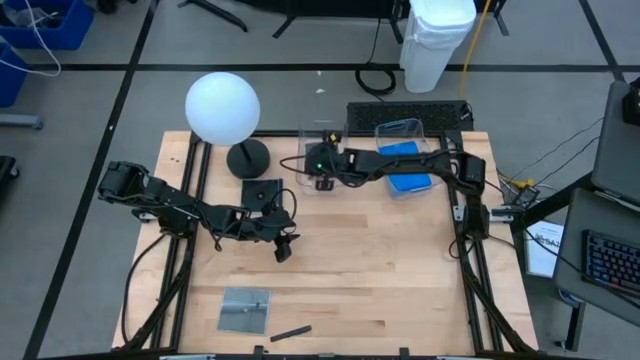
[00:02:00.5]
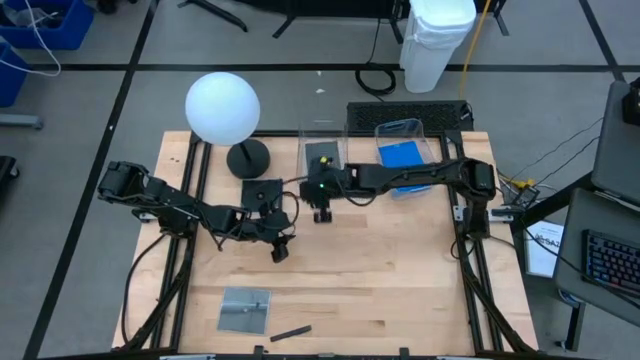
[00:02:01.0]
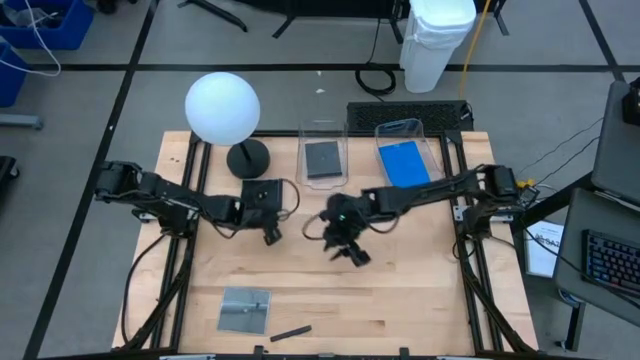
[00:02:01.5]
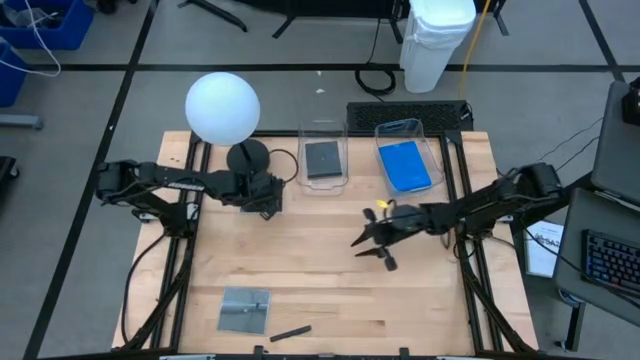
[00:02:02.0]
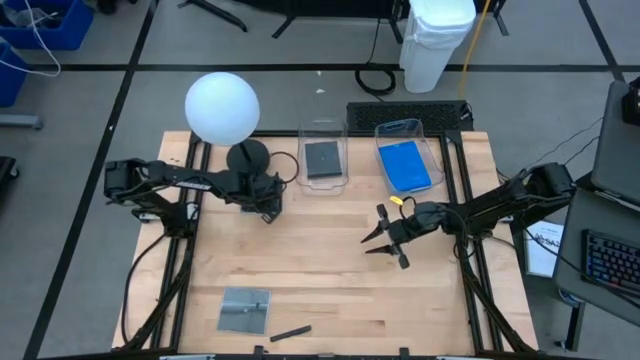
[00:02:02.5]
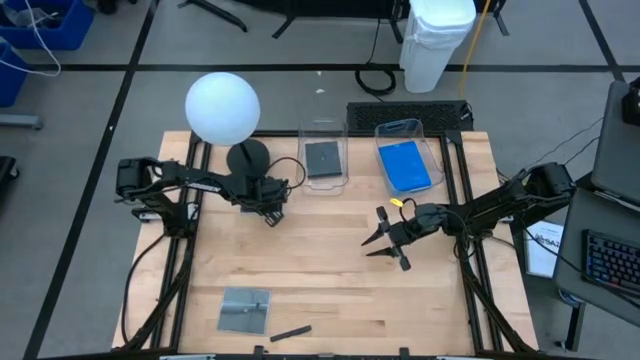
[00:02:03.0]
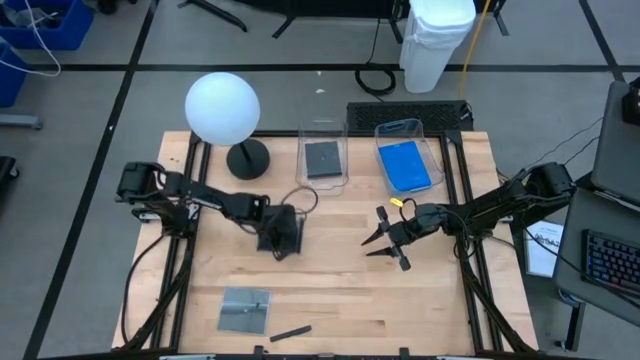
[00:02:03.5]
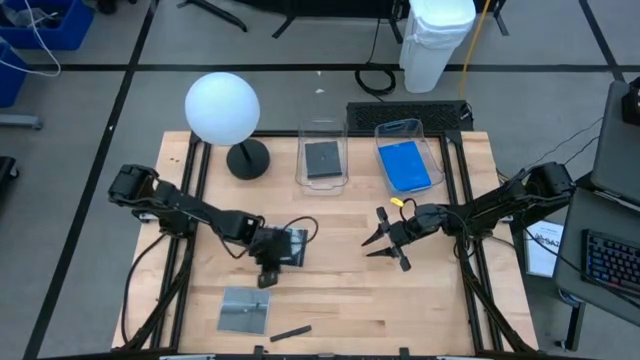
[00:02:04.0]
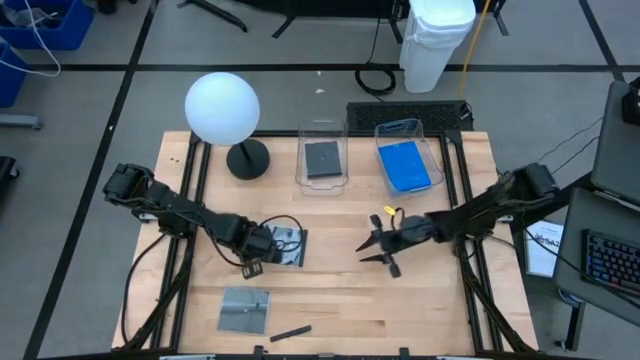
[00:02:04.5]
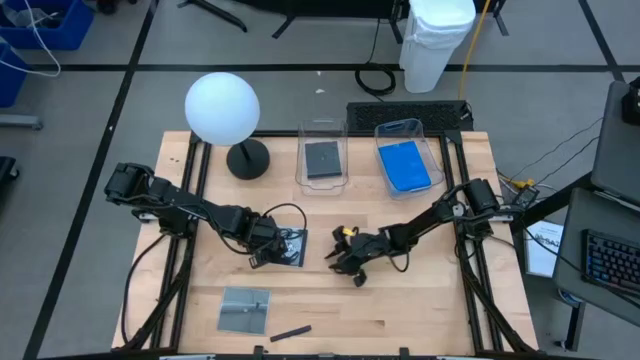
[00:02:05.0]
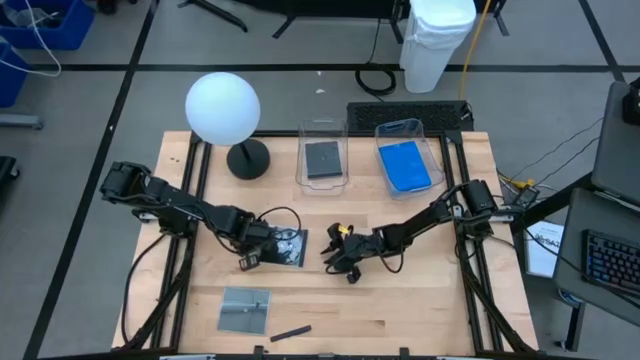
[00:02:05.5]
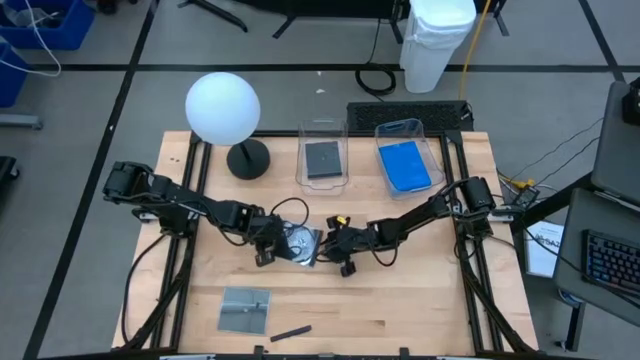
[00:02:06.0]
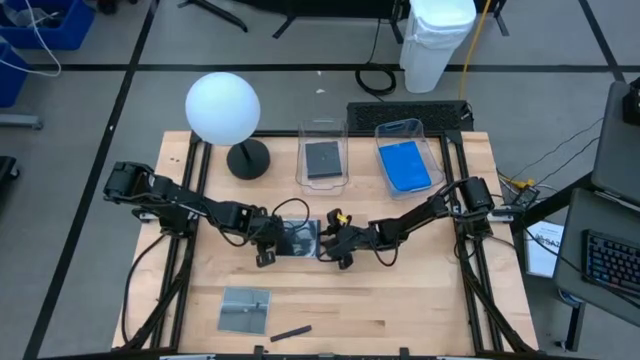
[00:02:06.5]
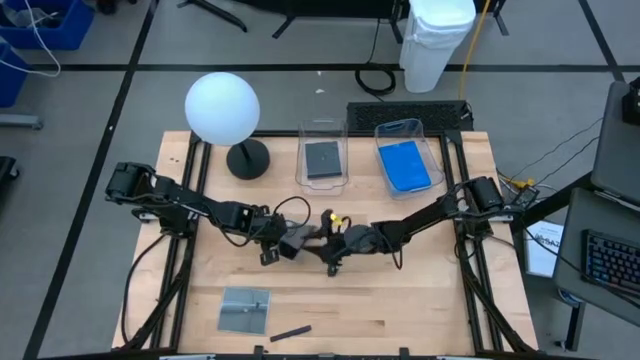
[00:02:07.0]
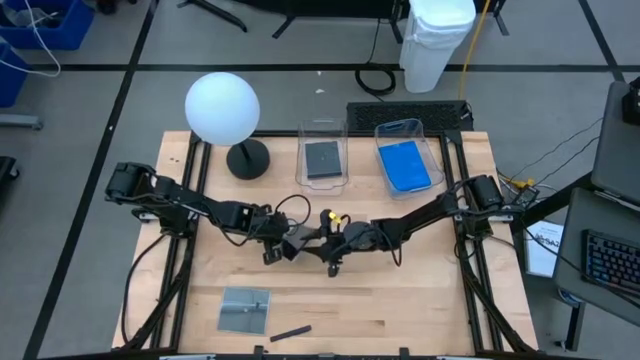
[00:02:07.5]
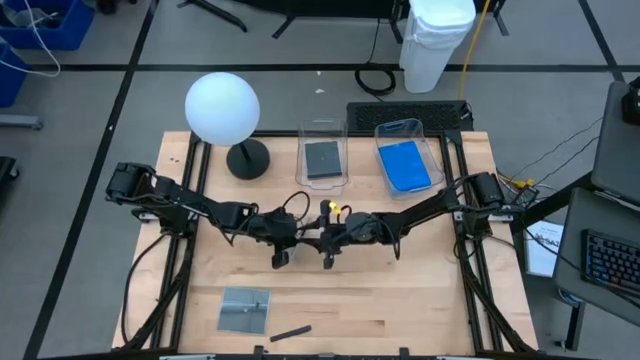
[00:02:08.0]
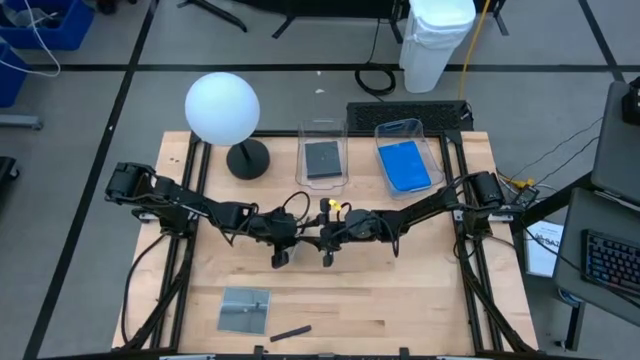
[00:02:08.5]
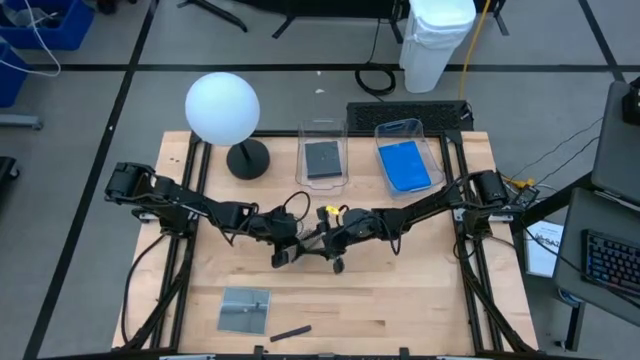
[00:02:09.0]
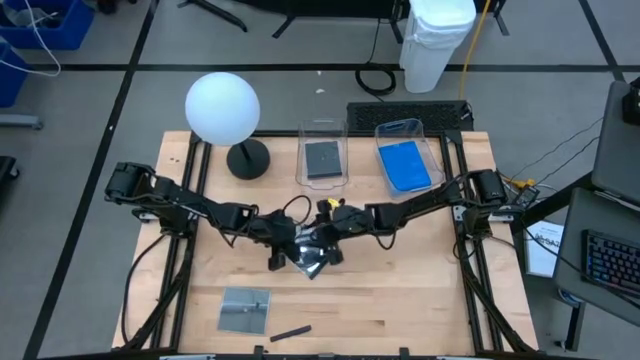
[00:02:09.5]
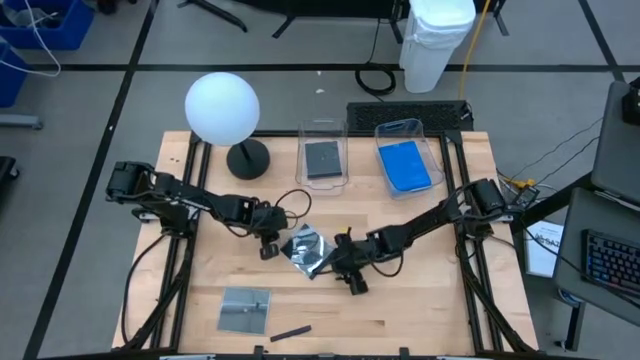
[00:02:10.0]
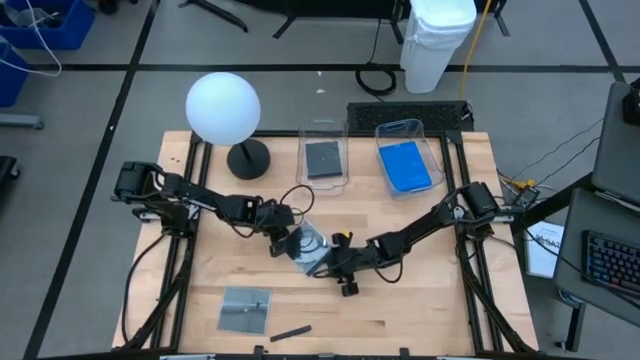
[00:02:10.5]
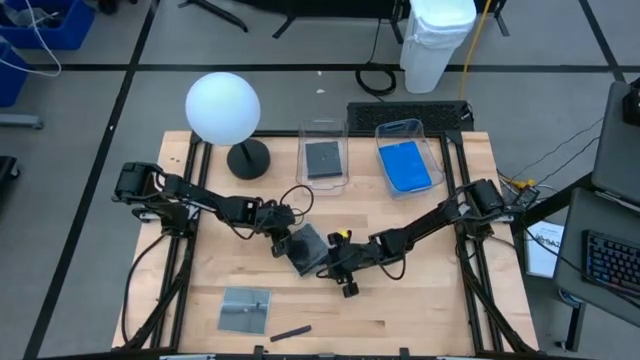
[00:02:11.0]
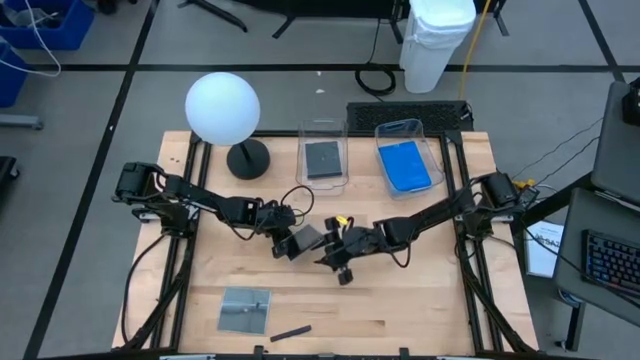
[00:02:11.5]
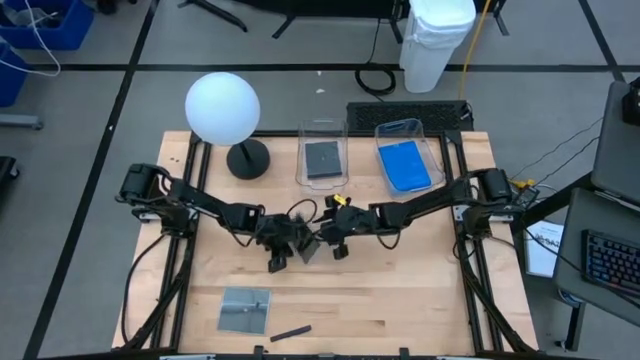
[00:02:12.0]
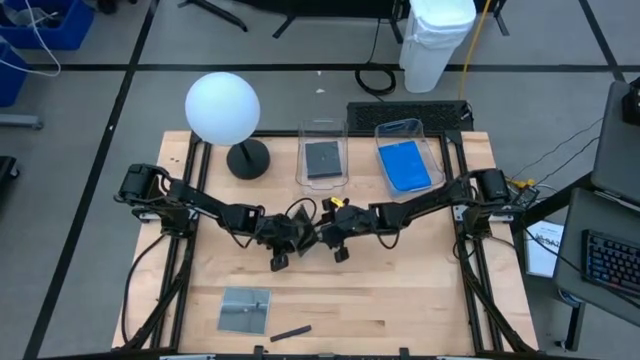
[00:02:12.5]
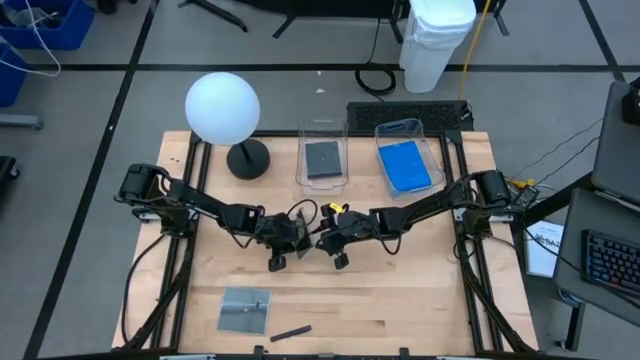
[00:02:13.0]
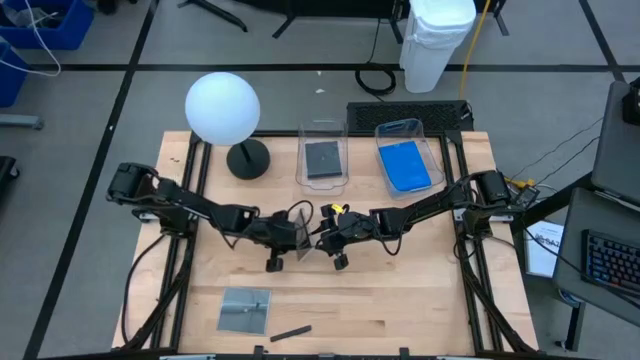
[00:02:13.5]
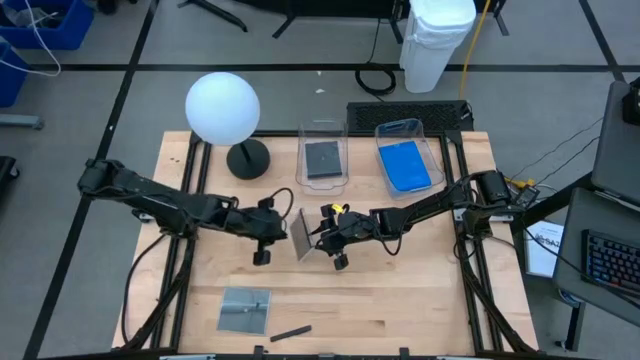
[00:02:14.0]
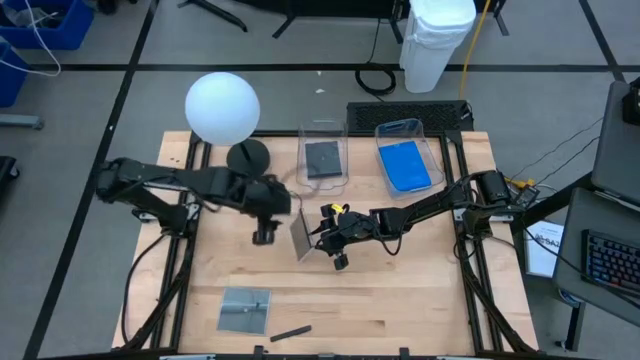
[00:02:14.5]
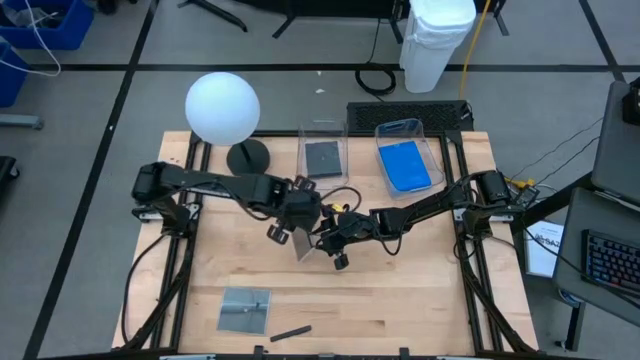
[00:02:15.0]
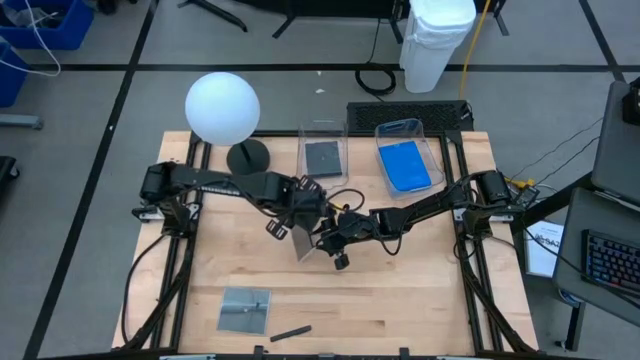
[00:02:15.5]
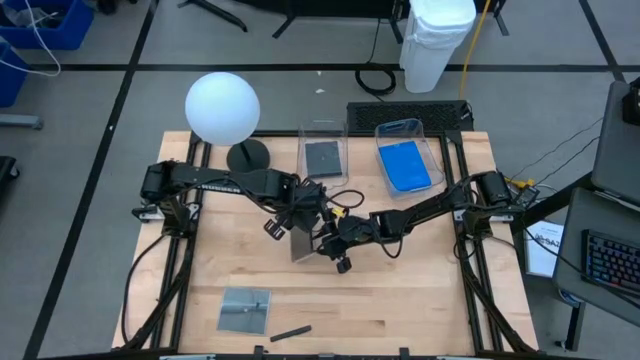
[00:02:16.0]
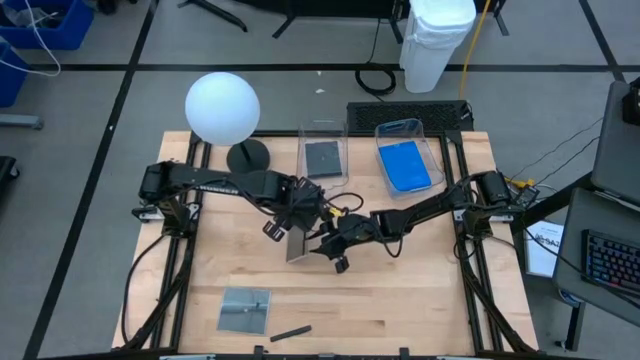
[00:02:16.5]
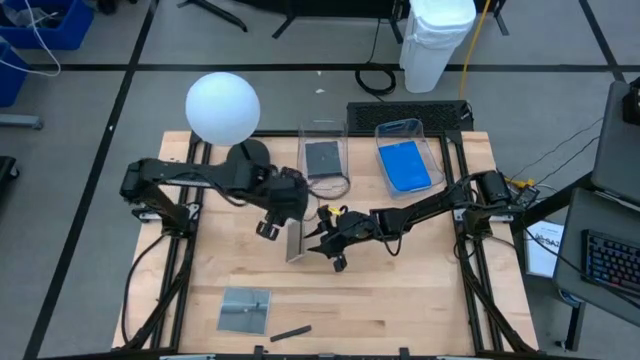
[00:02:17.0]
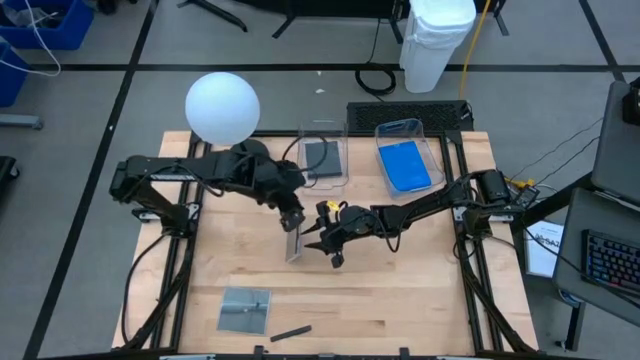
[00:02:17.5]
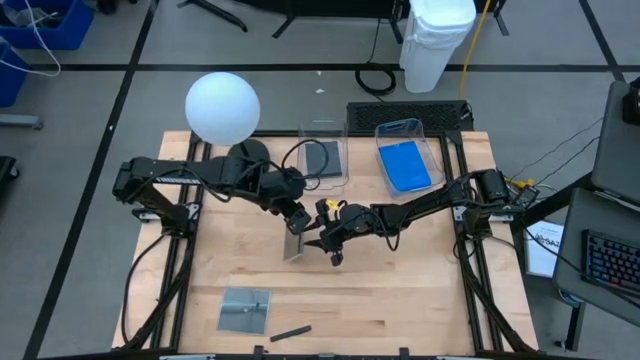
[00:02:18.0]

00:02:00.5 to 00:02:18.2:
Task: Pick & place jewel cases by type
Put the top black CD case into the left transparent bin

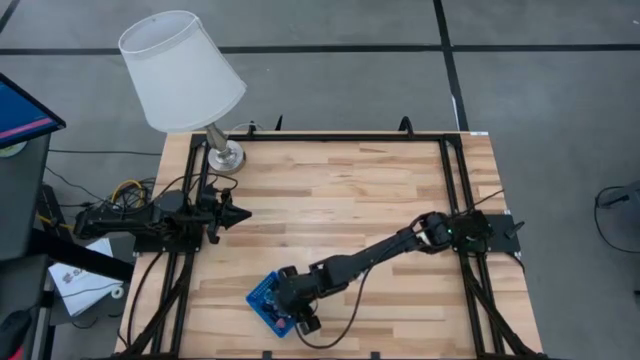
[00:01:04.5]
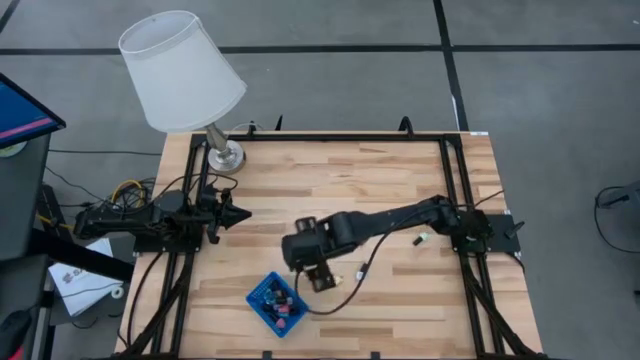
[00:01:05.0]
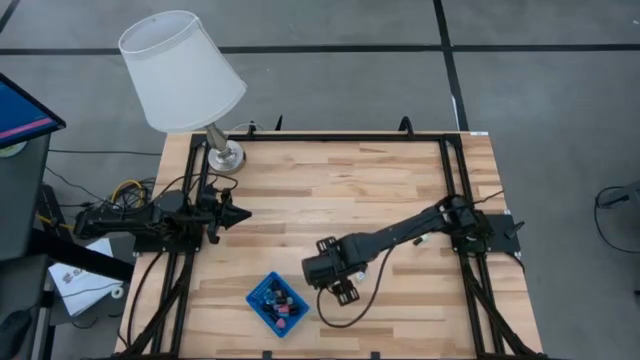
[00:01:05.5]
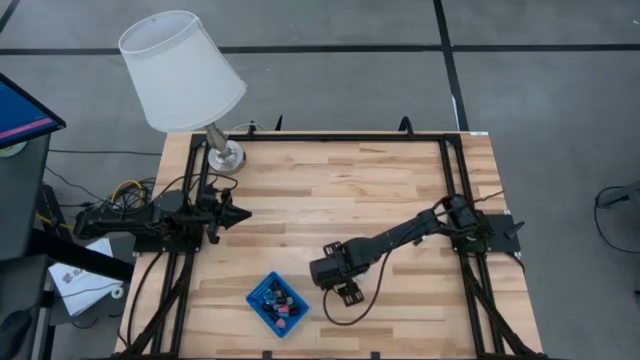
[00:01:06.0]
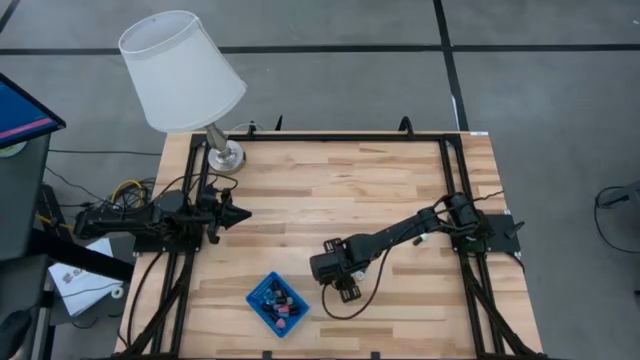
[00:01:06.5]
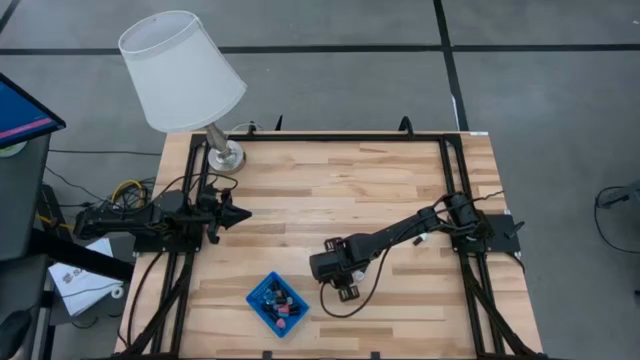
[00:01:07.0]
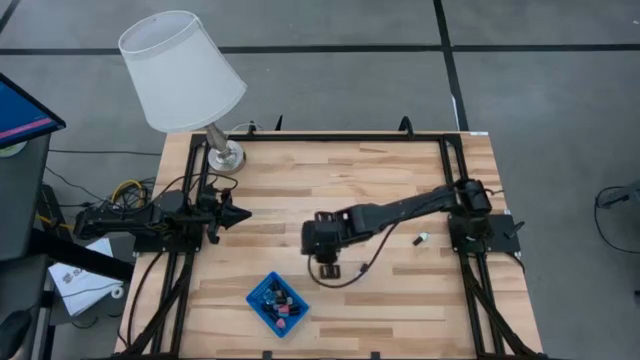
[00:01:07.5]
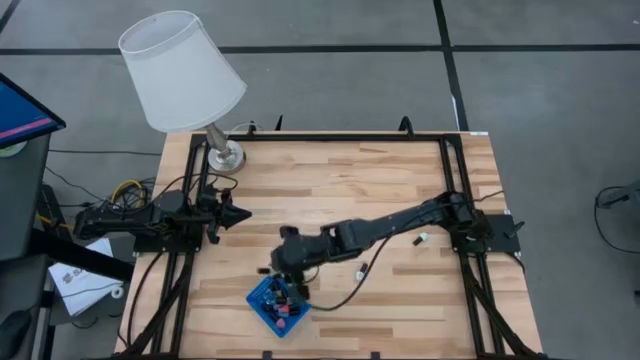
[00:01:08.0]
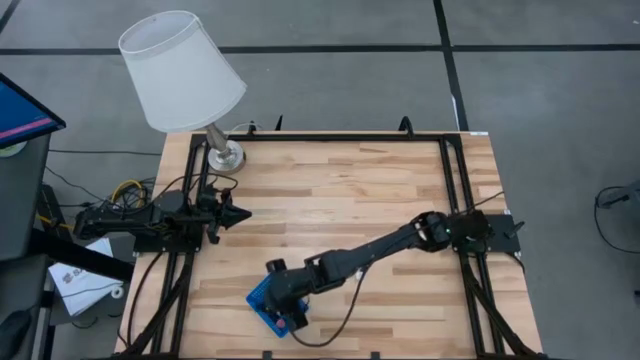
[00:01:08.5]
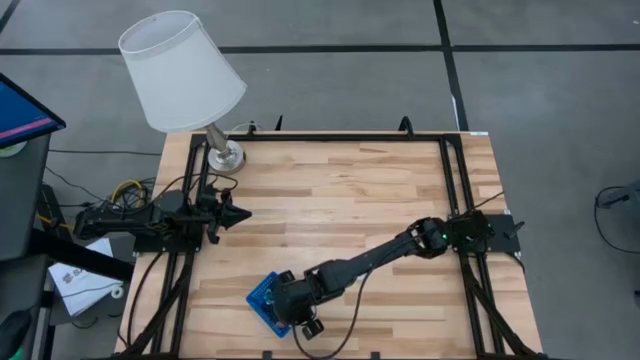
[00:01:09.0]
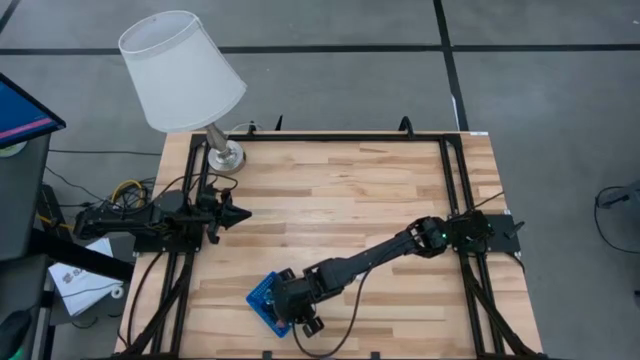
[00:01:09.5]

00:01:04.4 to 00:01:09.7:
Task: Pick & Place Nail Polish
Put the yellow nail polish bottle in the blue bin
